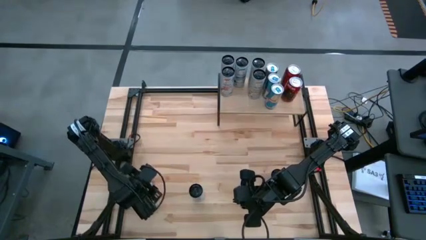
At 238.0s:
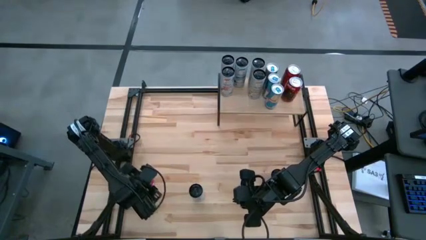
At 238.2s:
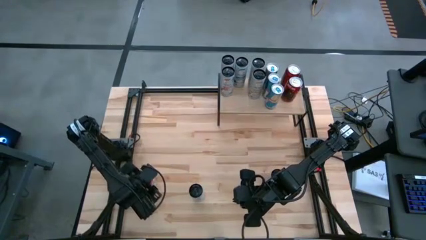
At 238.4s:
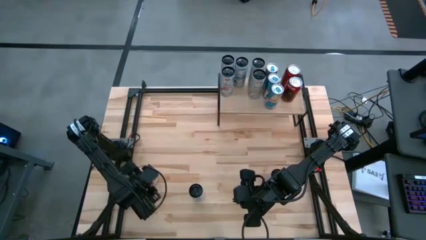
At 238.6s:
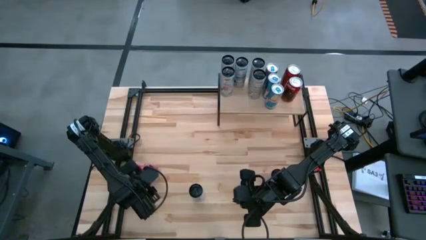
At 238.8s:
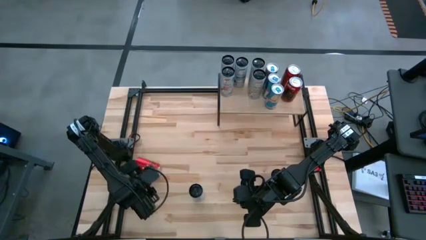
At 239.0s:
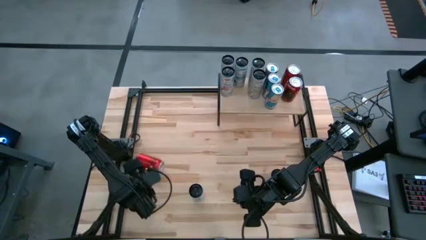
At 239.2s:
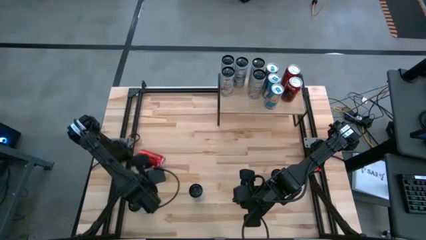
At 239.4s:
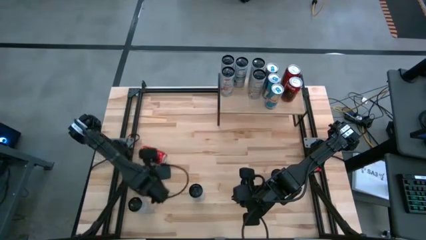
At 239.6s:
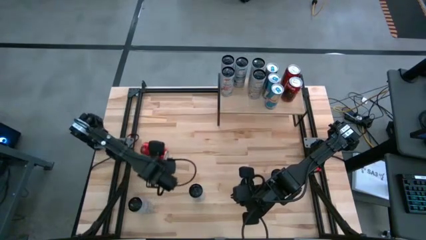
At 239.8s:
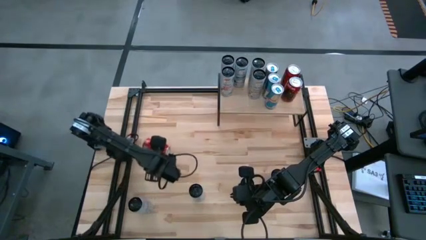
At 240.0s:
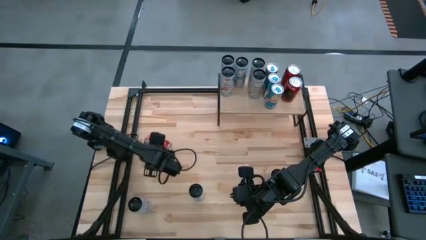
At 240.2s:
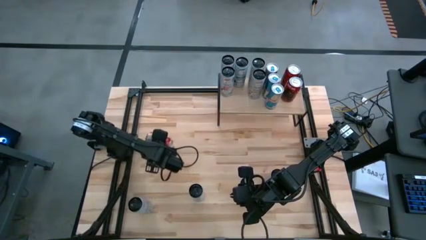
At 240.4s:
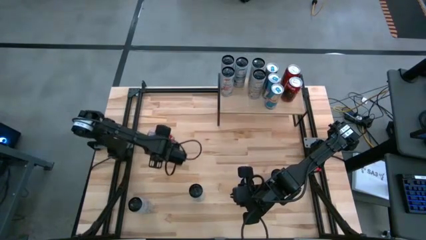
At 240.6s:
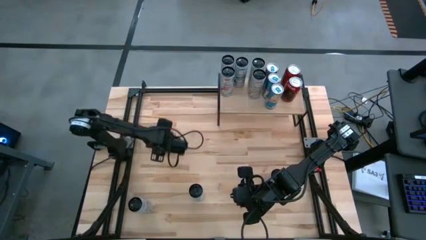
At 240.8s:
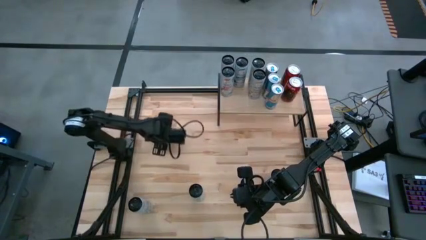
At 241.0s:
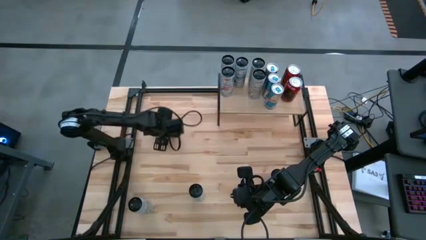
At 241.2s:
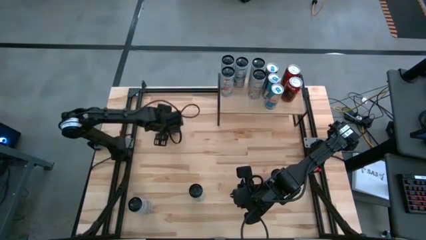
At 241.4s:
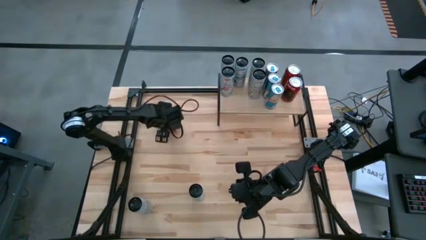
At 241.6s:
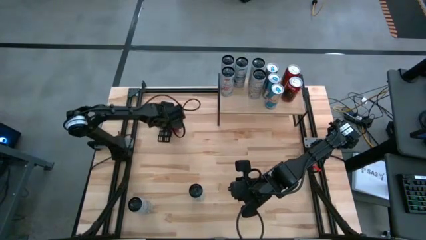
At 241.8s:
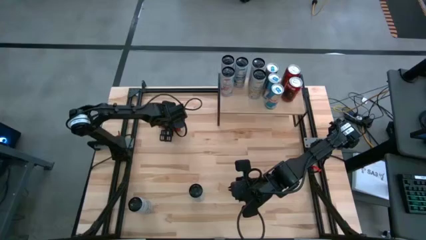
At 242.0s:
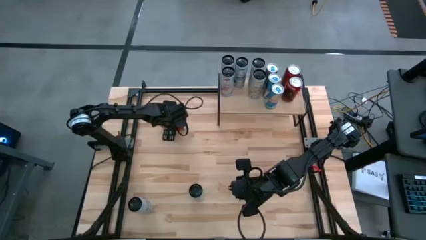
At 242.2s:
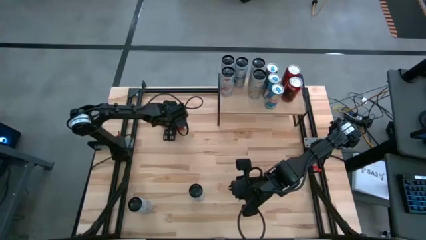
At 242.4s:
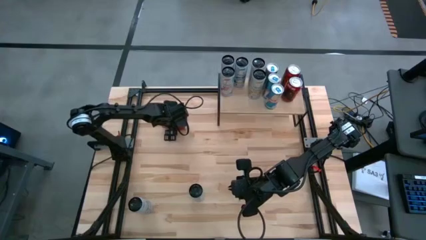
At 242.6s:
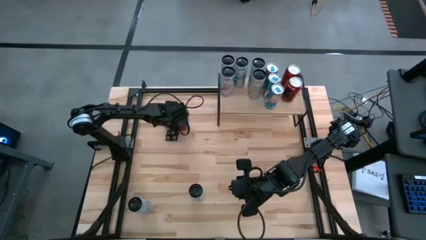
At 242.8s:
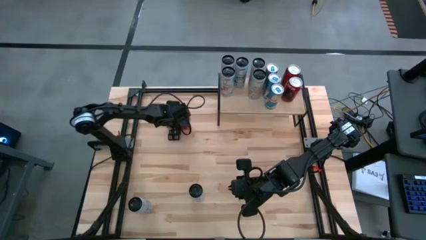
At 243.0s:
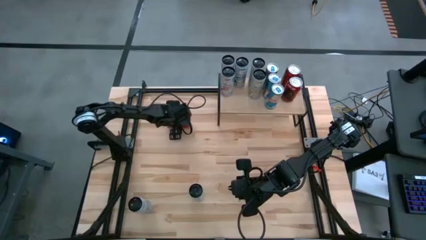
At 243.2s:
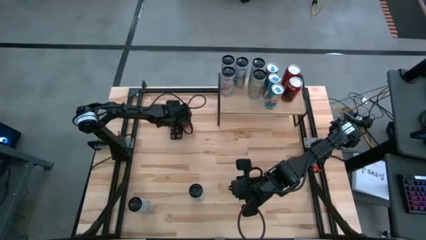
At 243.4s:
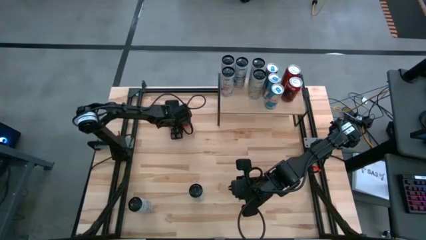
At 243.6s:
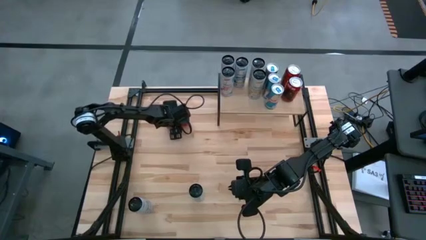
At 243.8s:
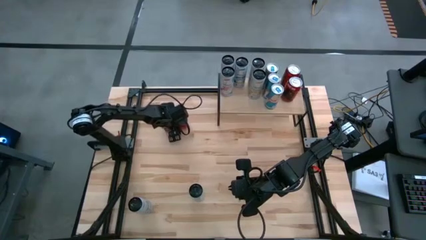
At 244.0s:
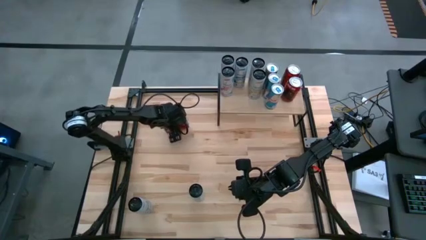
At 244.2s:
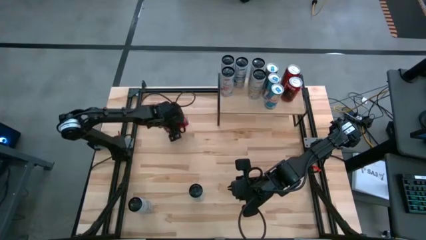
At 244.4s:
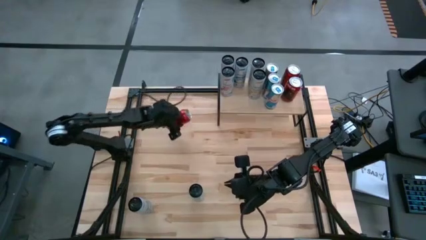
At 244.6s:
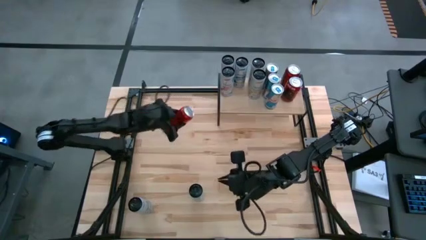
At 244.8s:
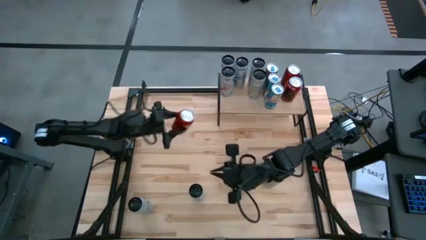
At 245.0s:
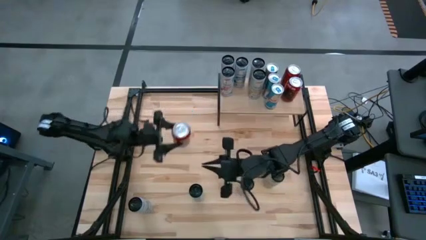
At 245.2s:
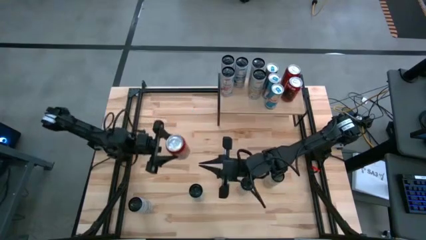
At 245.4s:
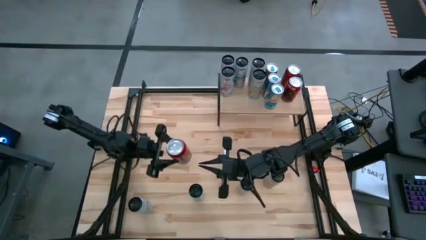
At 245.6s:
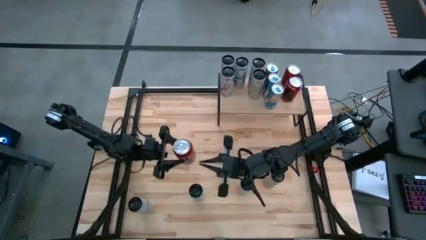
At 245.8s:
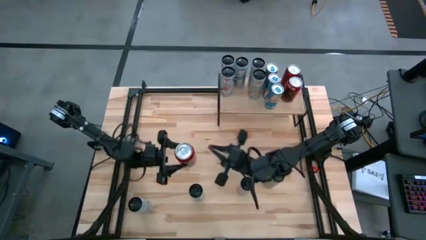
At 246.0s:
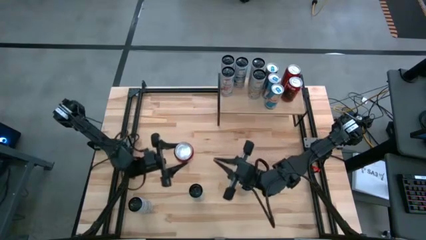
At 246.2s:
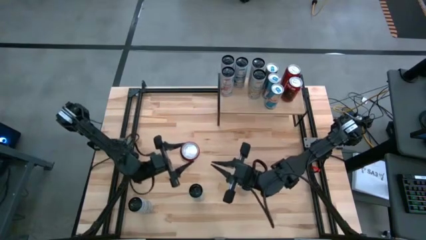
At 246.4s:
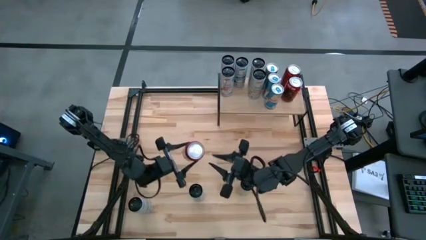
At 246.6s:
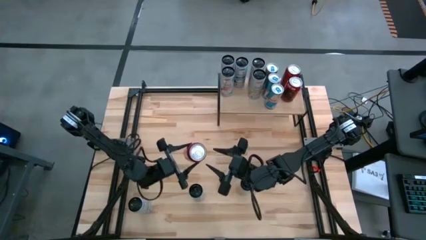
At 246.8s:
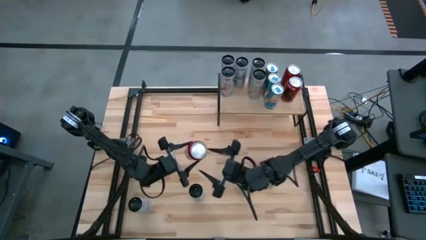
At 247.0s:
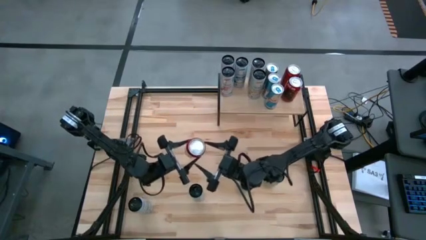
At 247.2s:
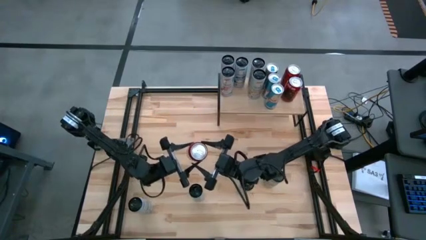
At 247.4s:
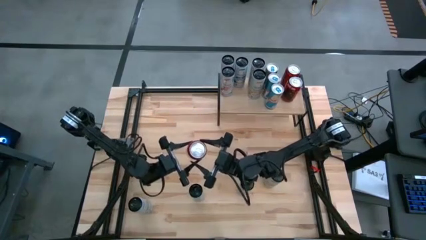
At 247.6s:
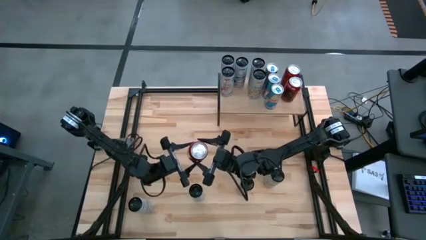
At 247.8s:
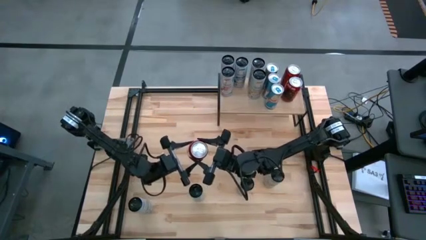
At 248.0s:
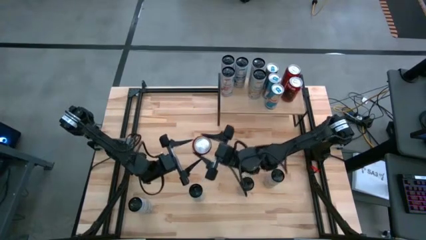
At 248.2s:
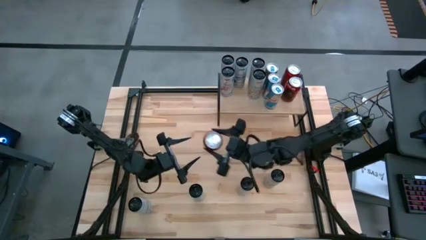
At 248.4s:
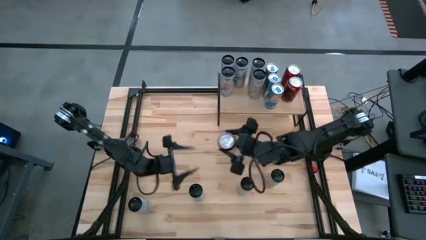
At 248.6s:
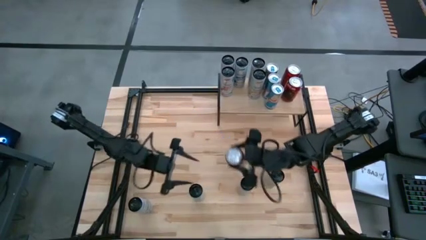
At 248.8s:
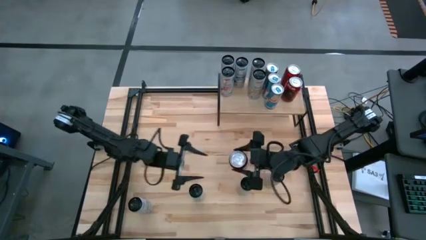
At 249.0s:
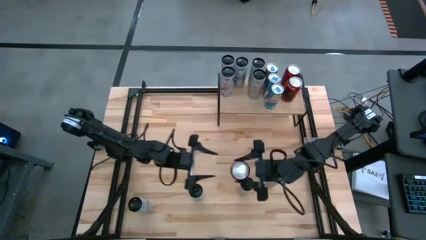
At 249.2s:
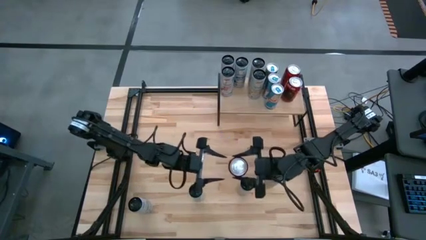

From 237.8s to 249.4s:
Task: Place canned beverage on shelf
Put the red black soda can on the shelf aligned with the red white soda cans

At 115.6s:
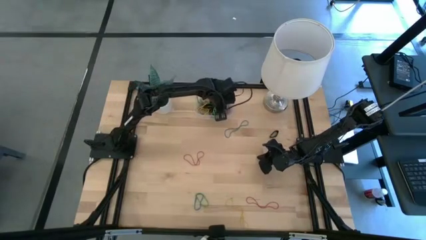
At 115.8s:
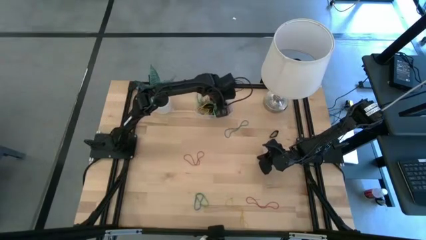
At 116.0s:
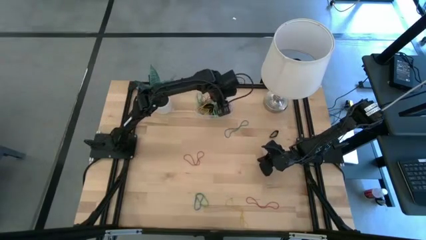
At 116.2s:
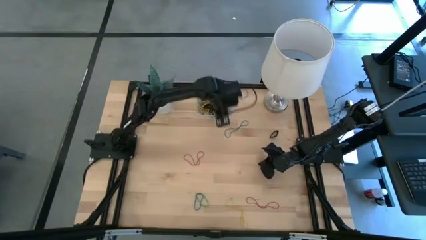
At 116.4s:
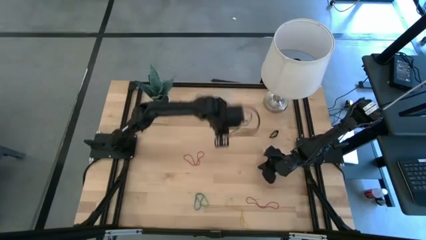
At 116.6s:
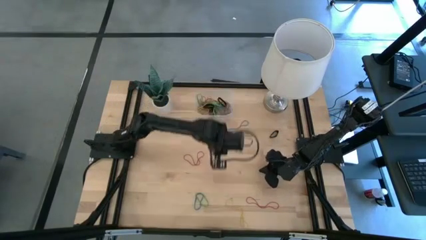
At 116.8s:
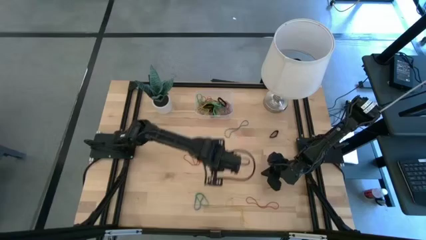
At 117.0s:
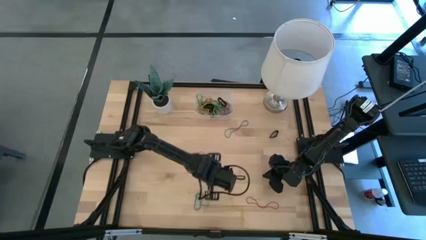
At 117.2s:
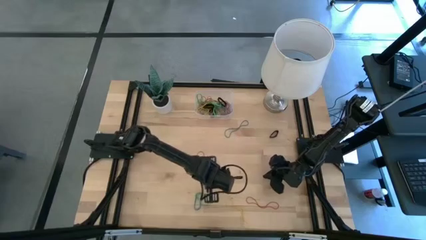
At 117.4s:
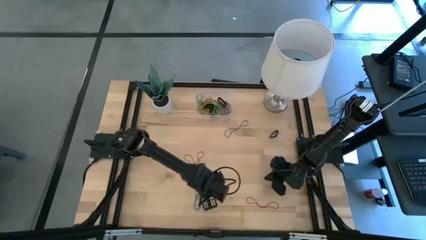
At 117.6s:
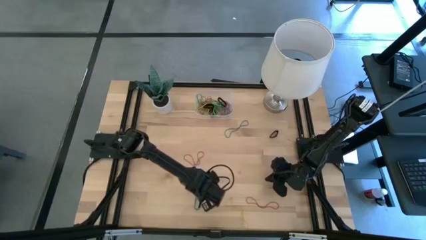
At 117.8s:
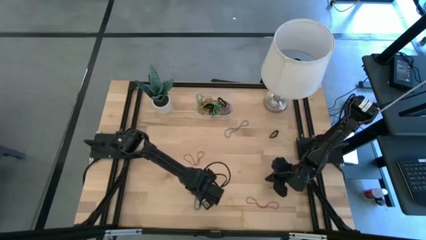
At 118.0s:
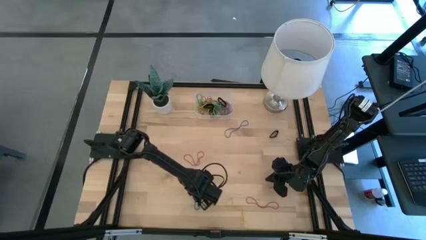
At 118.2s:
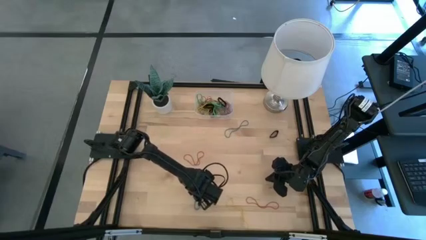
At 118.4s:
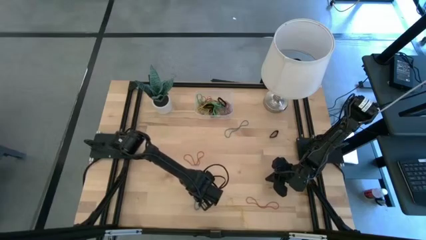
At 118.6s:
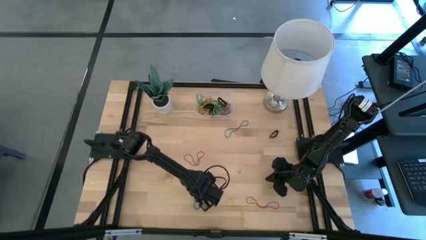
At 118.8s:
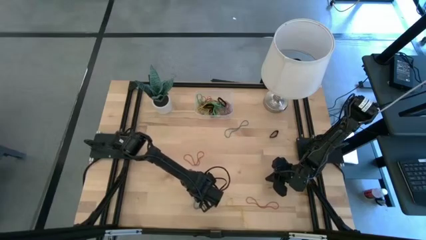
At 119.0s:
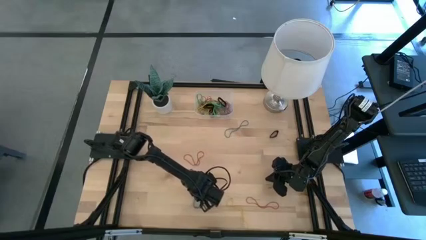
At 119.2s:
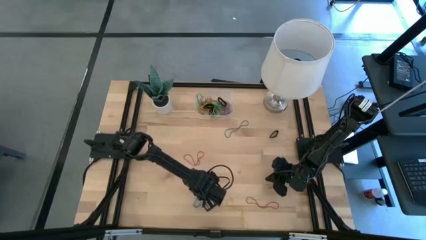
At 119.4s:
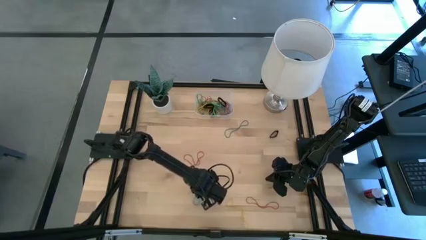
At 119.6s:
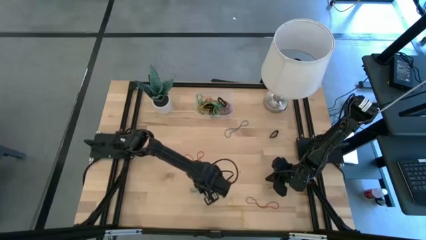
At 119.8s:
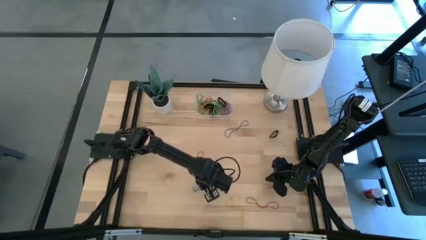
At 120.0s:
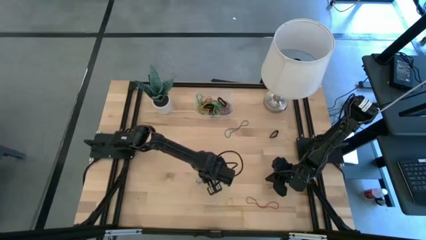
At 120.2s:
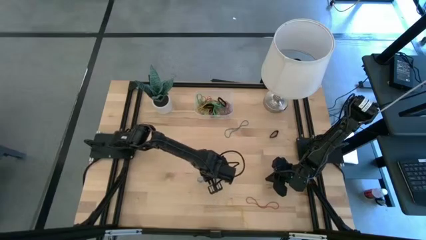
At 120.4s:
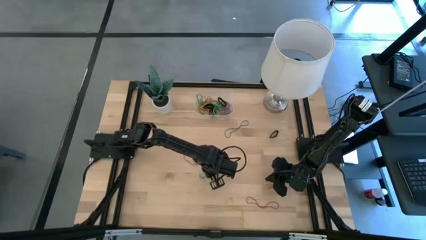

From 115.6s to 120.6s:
Task: Pick and place rubber bands into bin
Put the blue rubber band into the transparent bin

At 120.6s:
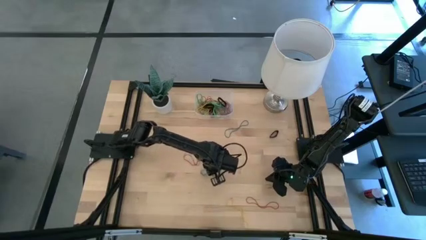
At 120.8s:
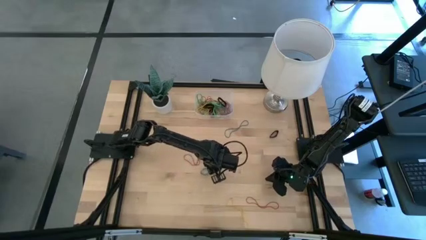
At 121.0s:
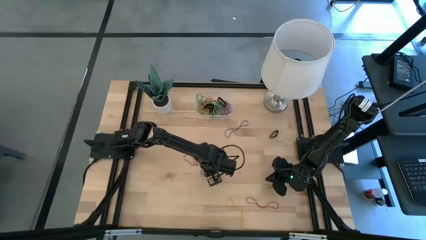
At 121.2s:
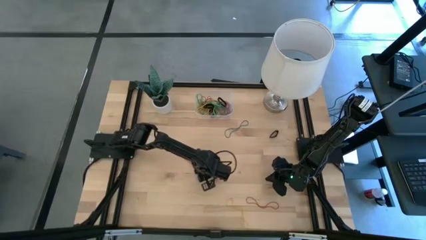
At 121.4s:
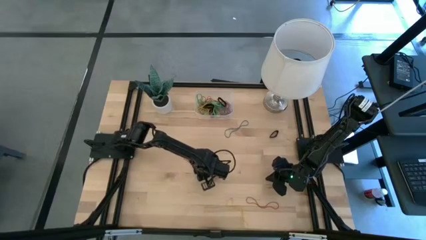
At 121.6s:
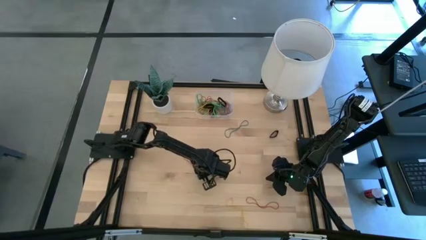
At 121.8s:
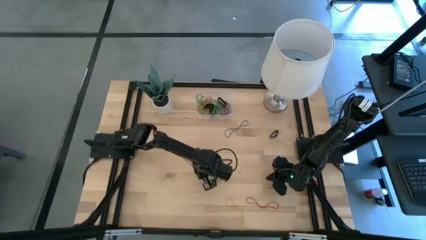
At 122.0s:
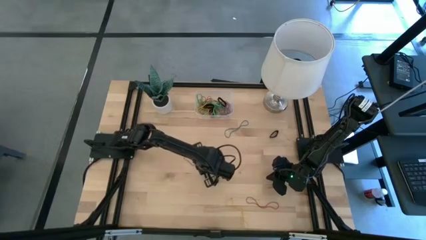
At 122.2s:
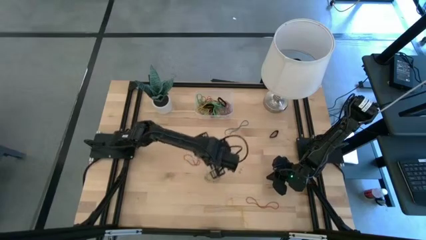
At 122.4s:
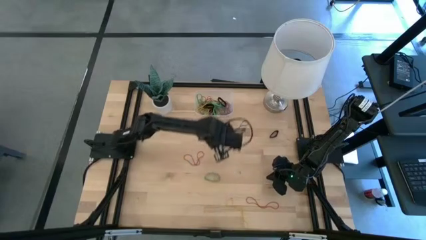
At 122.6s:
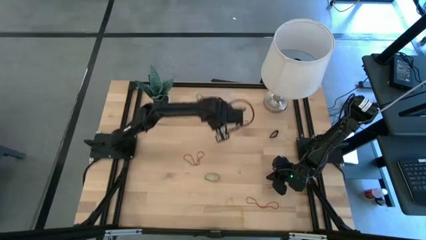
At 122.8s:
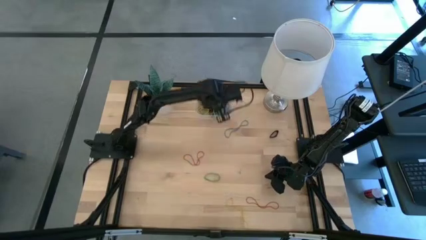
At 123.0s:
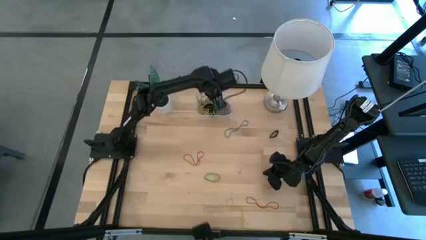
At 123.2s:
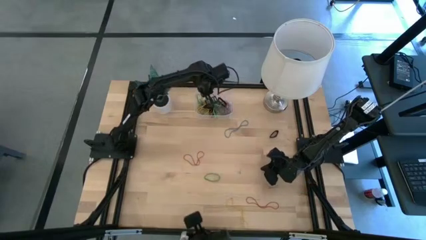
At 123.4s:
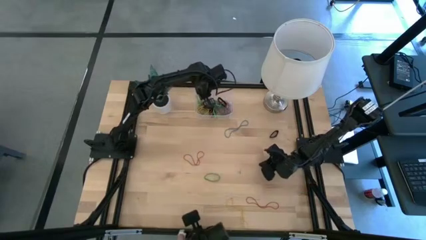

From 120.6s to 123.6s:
Put the blue rubber band into the transparent bin
